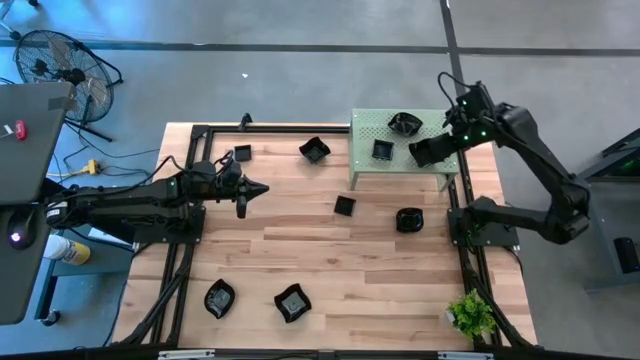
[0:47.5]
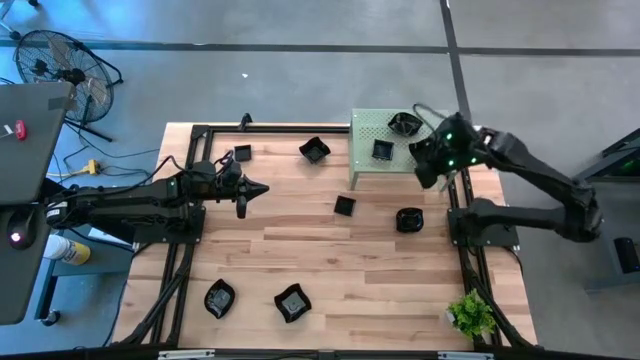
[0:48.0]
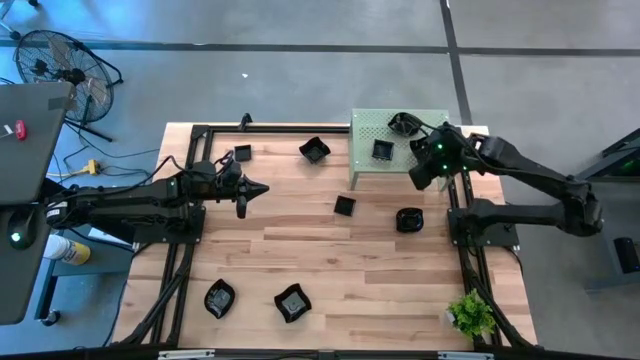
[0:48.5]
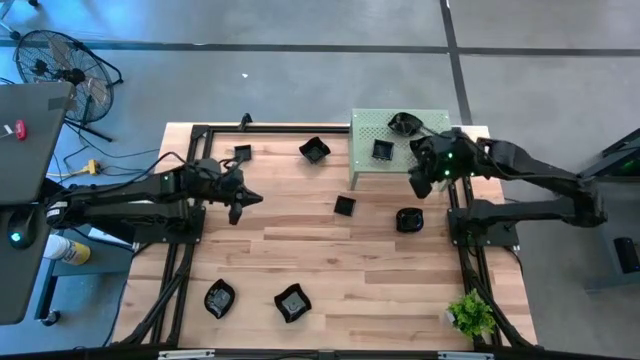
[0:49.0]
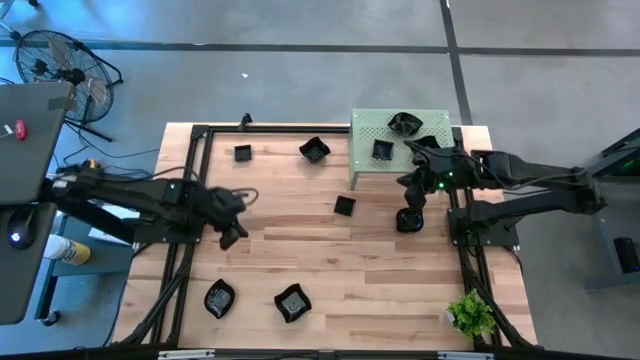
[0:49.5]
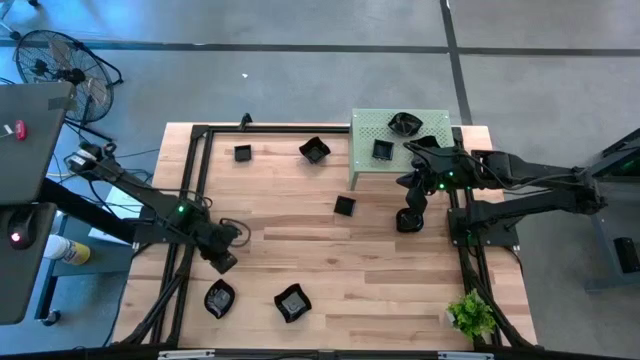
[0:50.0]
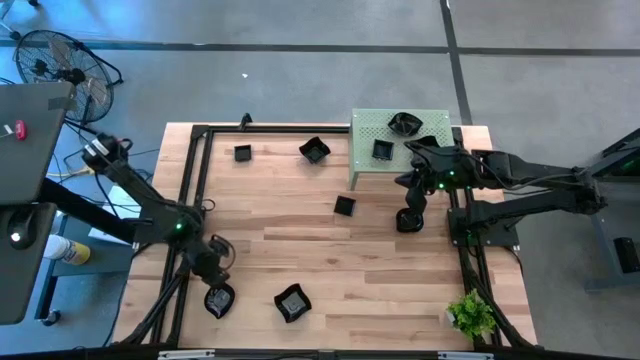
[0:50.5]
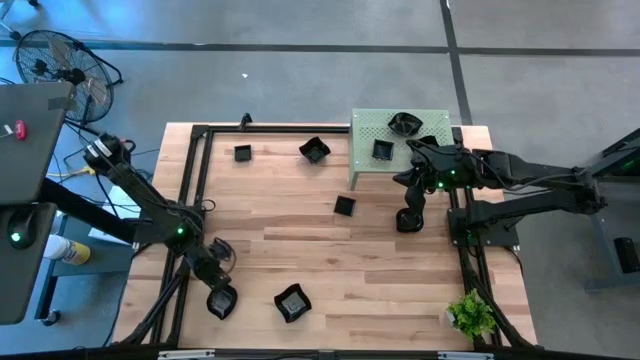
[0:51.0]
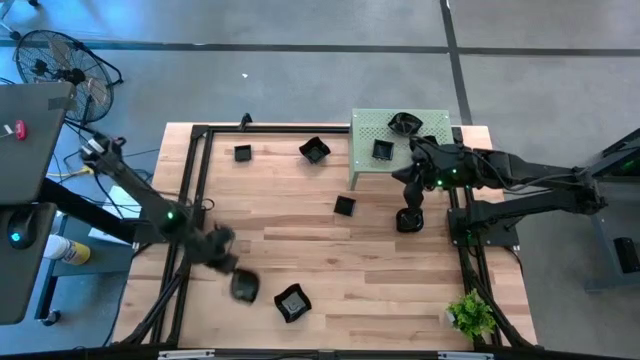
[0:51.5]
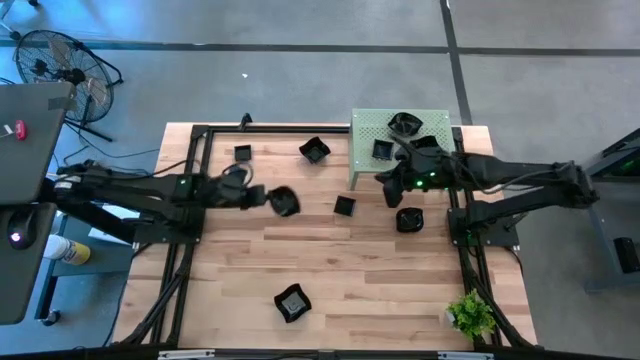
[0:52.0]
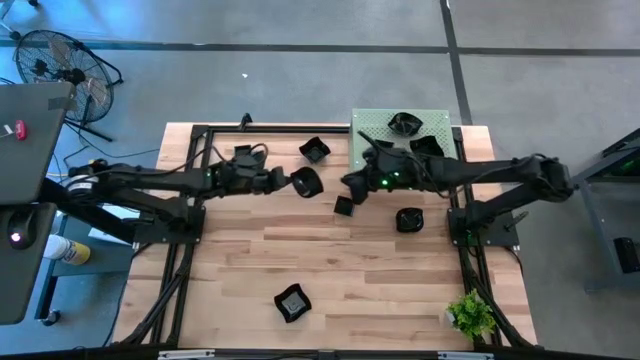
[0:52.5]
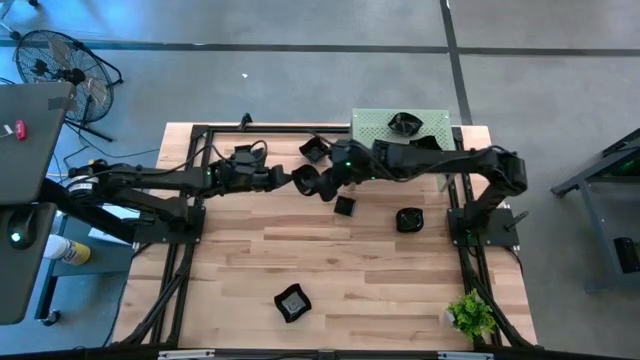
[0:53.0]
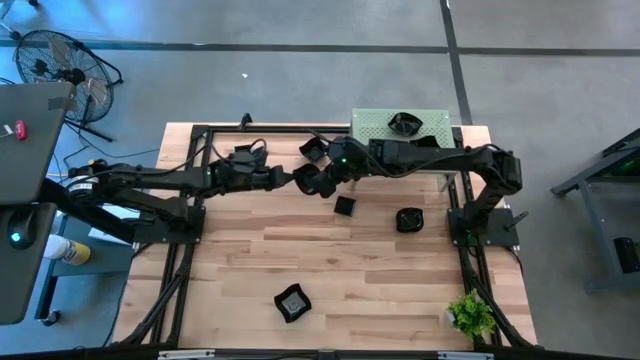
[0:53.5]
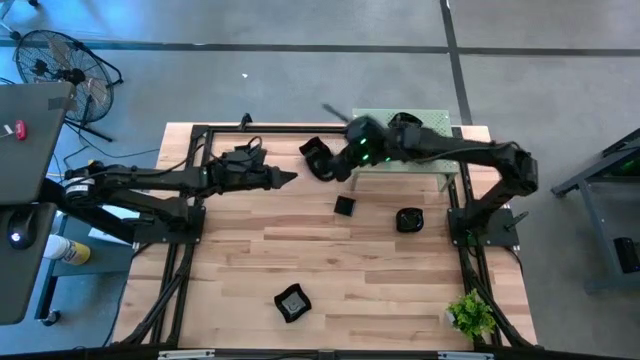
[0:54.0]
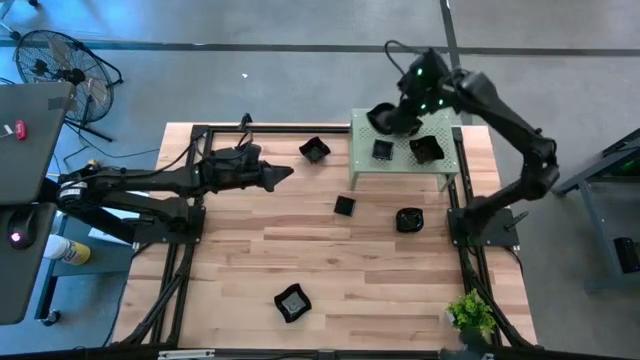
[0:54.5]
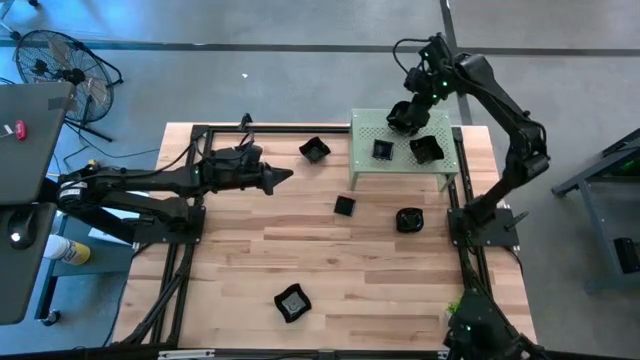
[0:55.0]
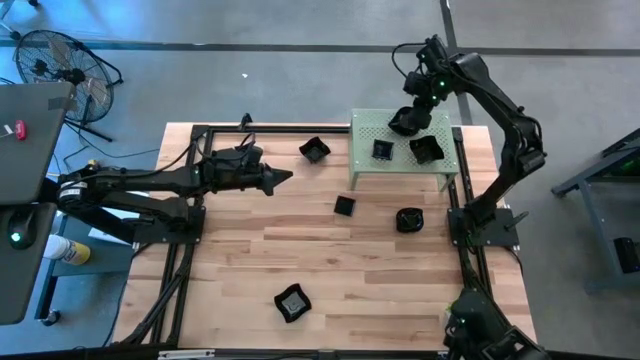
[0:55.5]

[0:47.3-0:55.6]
Task: Pick & Place Mini shaped plates
Stack the black leaf-shaped plate on top of the black leaf-shaped plate on the shelf

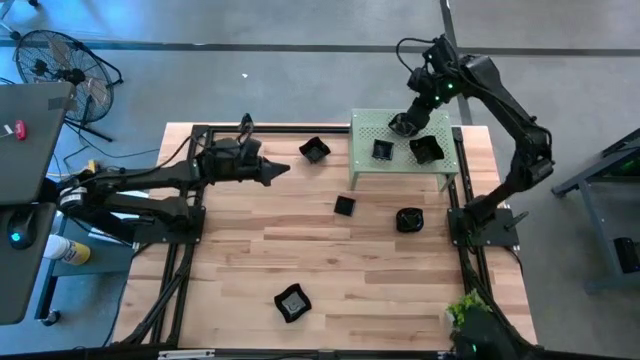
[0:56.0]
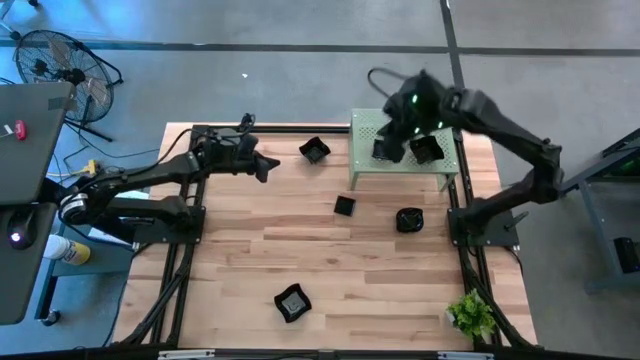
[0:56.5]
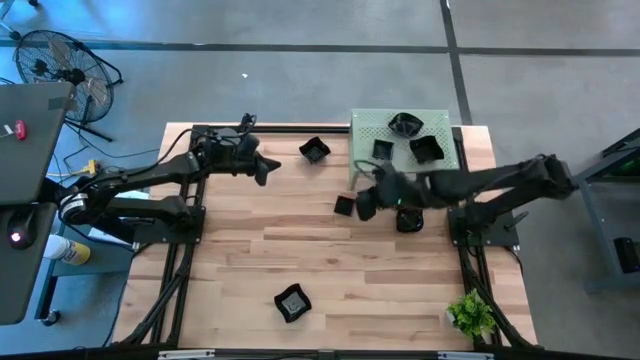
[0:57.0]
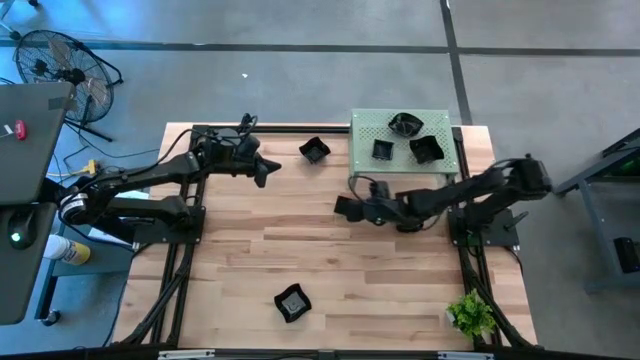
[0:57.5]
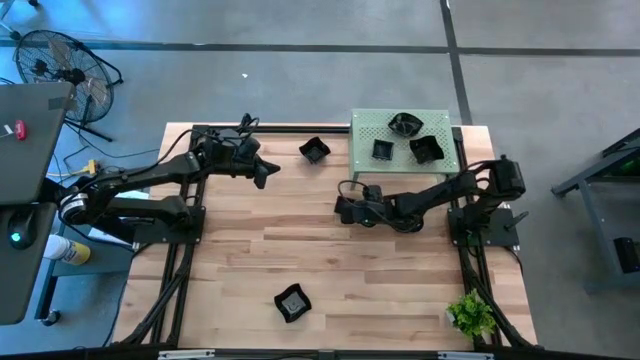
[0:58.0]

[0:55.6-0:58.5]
Stack the black square plate on top of the black square plate on the shelf

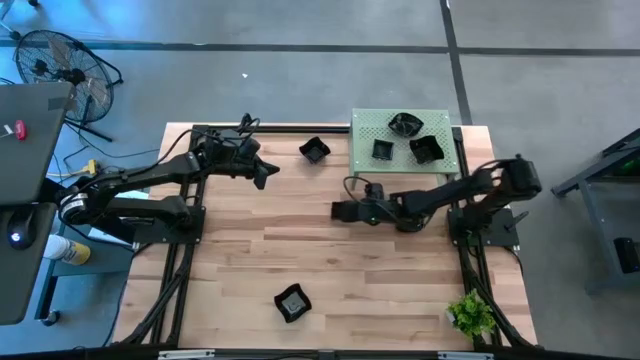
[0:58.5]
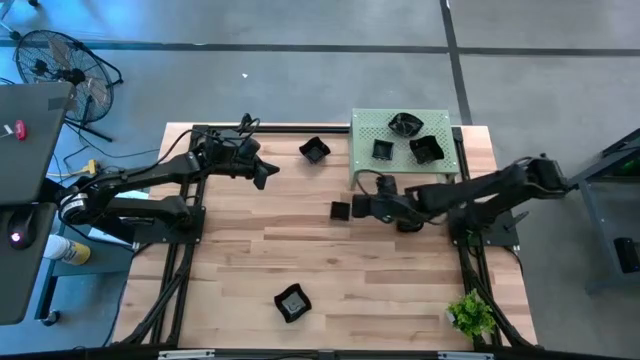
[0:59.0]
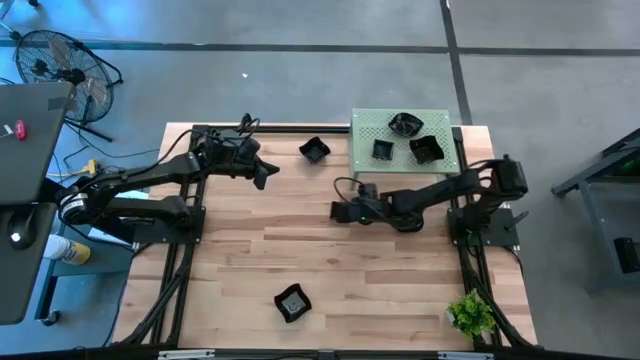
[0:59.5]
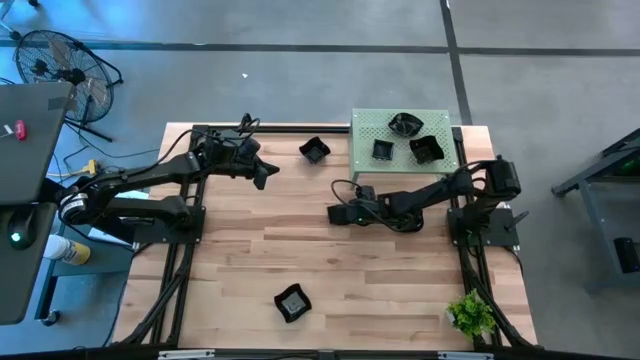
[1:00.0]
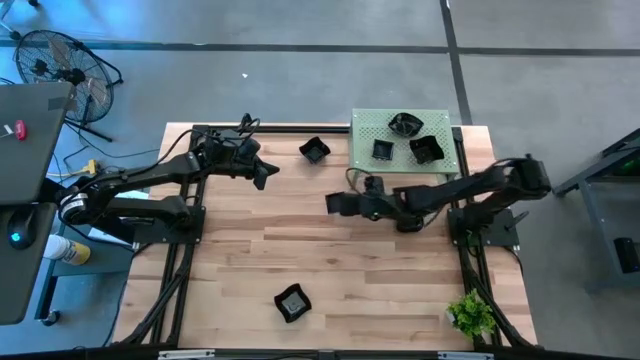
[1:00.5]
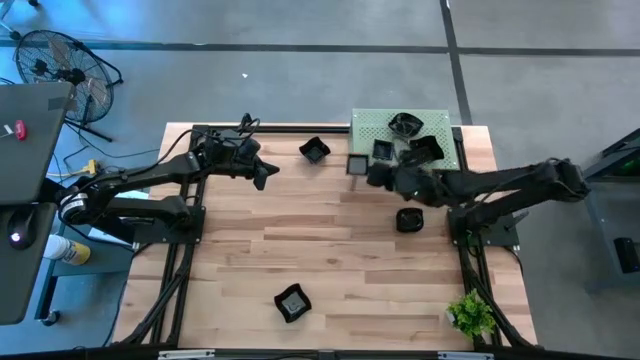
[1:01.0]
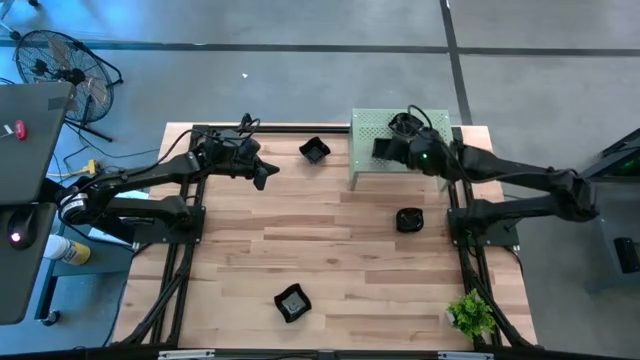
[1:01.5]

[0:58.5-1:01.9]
Stack the black square plate on top of the black square plate on the shelf

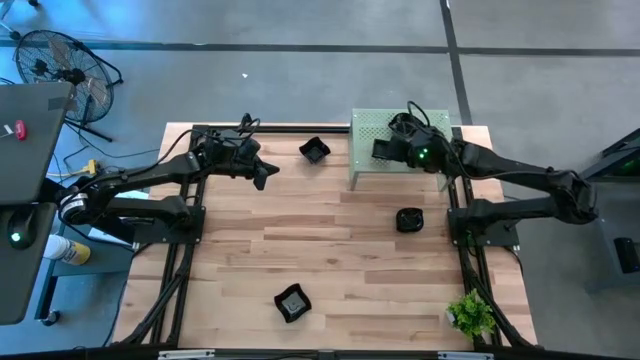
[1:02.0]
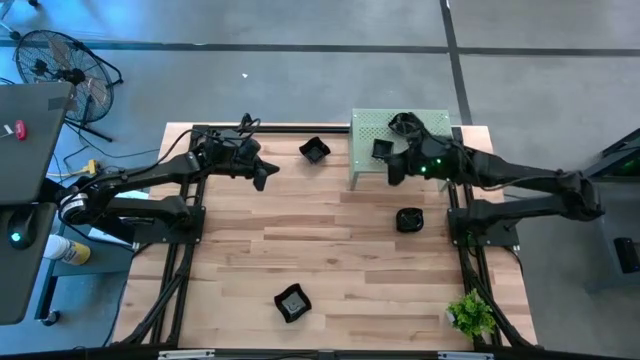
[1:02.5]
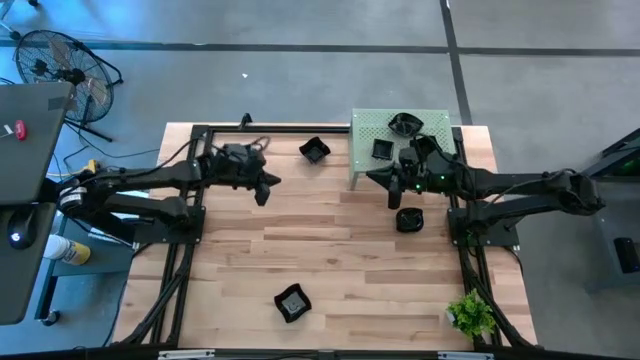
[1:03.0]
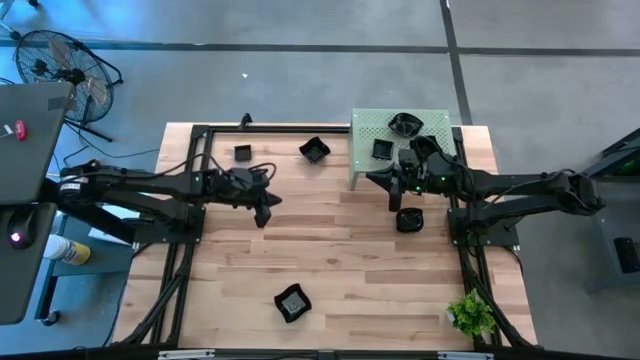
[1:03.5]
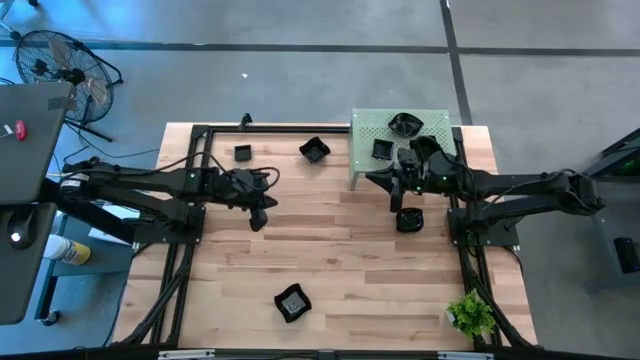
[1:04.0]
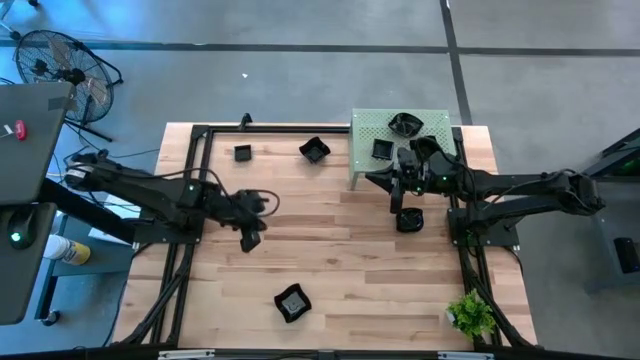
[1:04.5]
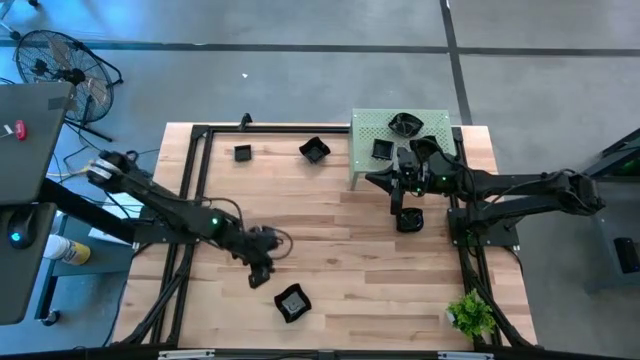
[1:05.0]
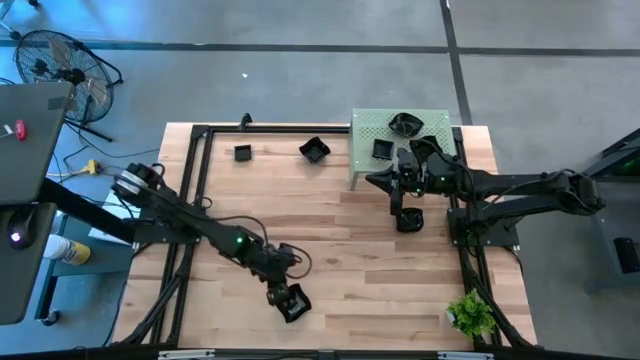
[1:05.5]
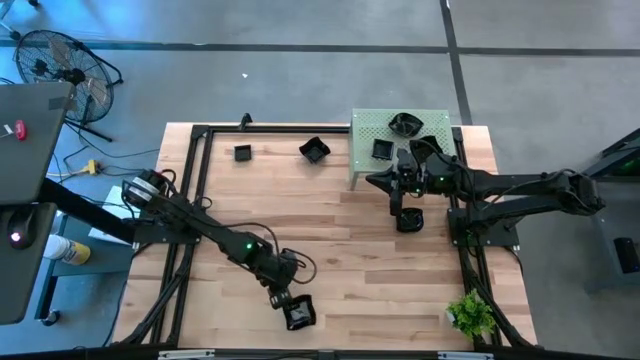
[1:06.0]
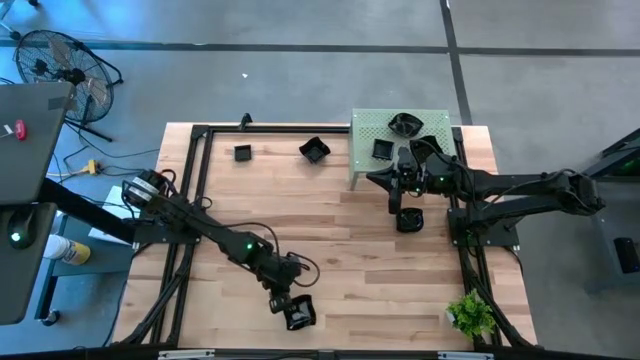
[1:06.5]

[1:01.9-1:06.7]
Stack the black distorted square plate on top of the black distorted square plate on the shelf

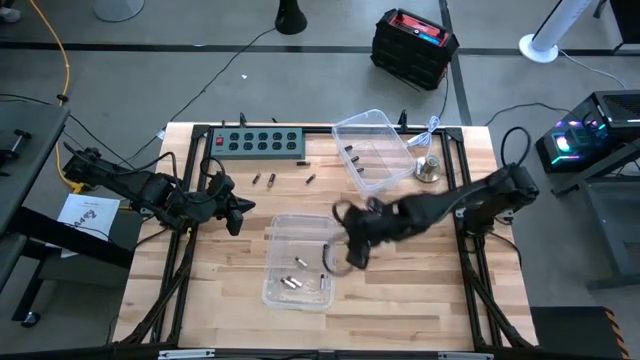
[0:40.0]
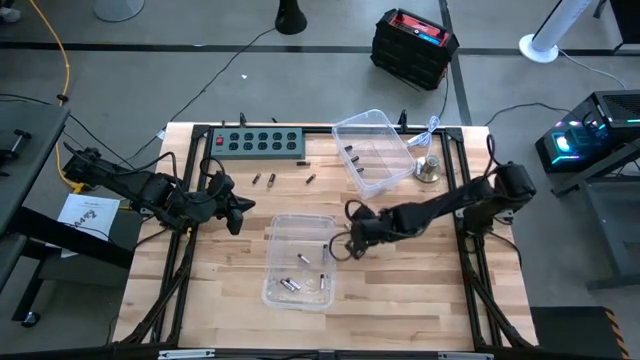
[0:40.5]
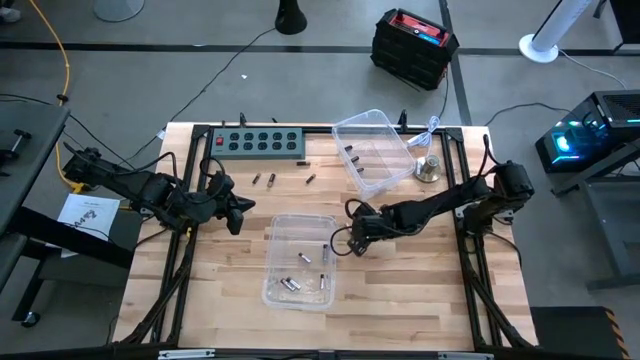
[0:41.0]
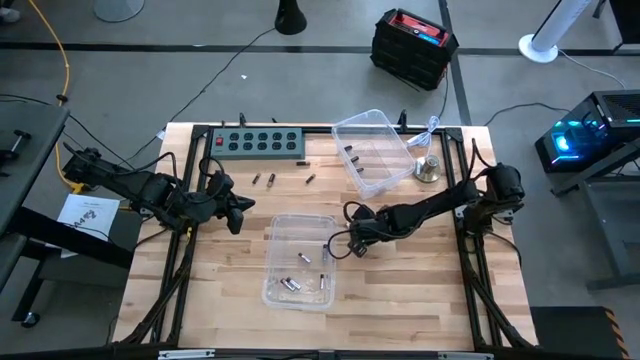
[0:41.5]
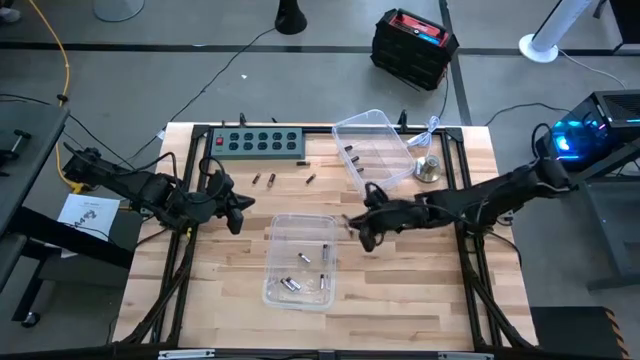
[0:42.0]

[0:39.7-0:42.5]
Task: Sort batteries
Put the silver battery into the left transparent bin
